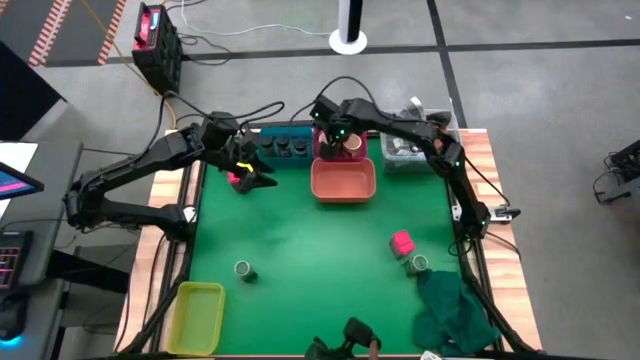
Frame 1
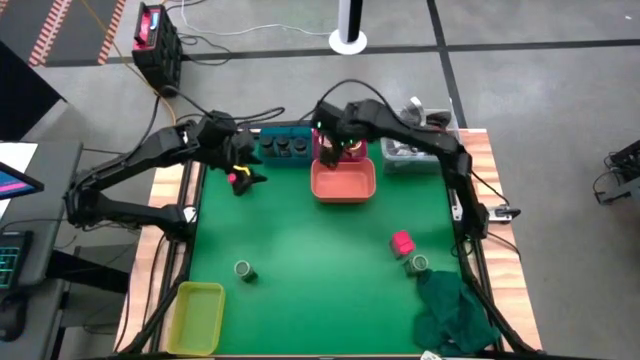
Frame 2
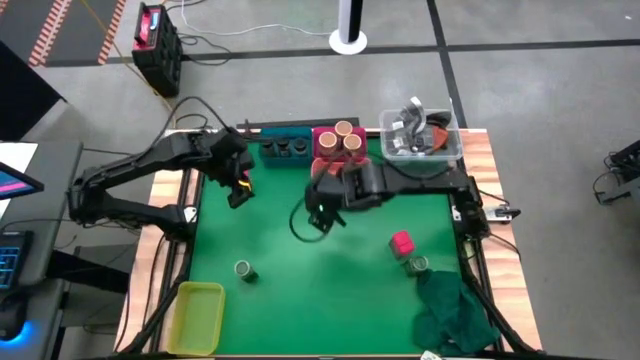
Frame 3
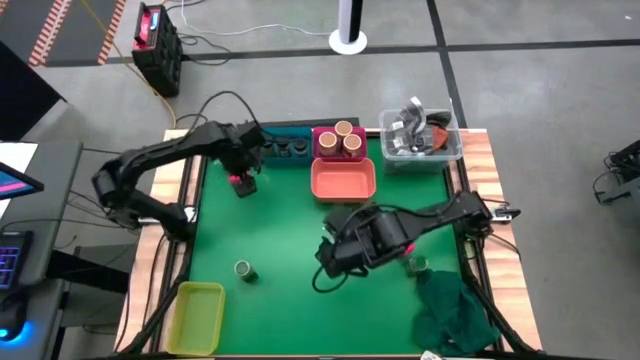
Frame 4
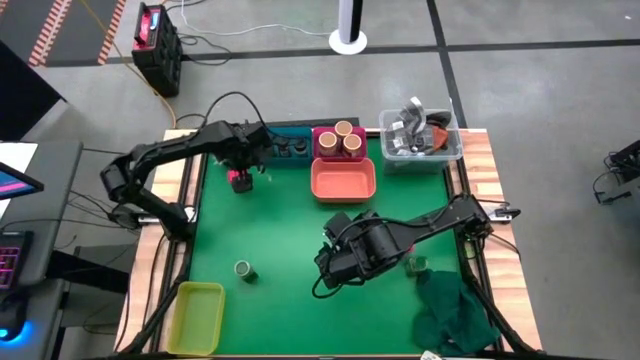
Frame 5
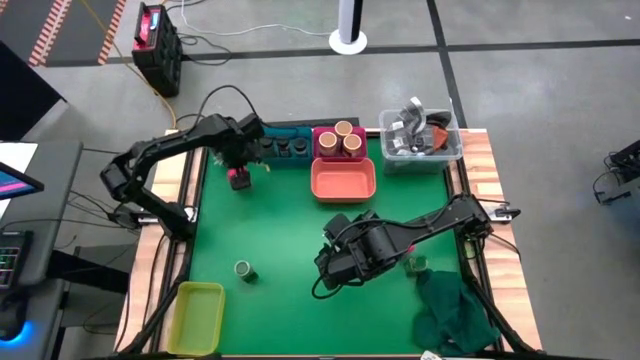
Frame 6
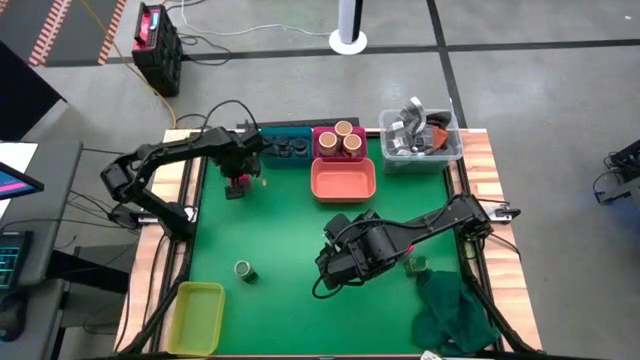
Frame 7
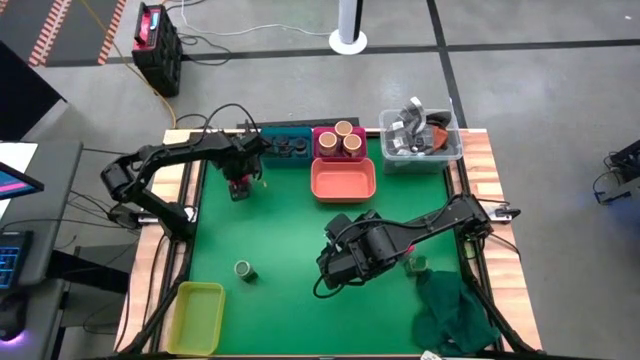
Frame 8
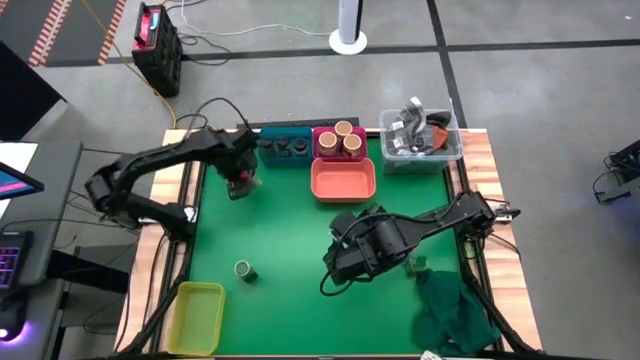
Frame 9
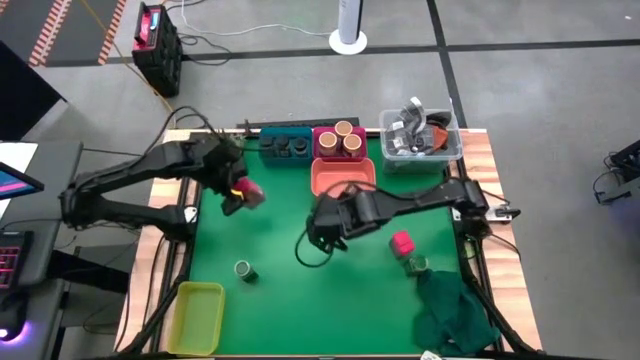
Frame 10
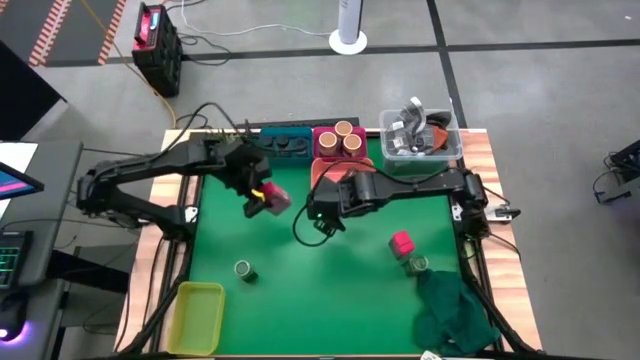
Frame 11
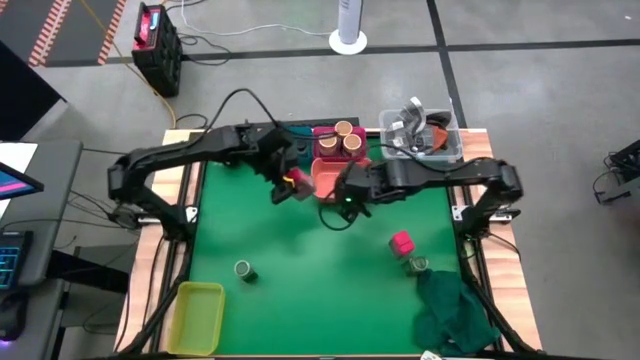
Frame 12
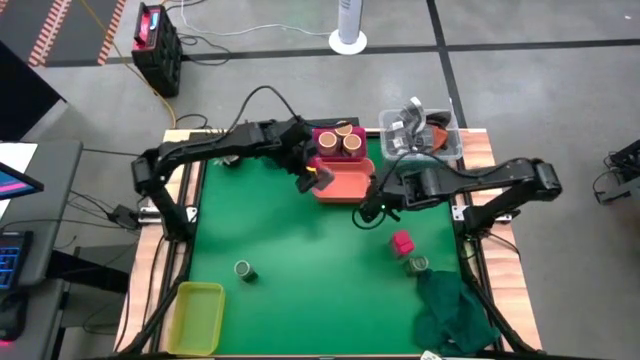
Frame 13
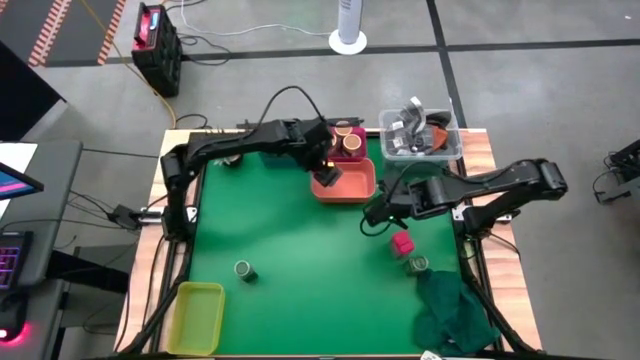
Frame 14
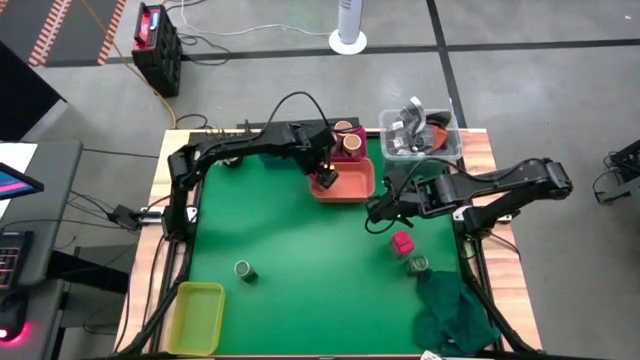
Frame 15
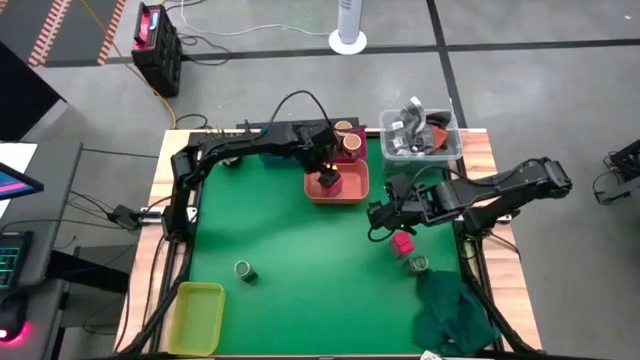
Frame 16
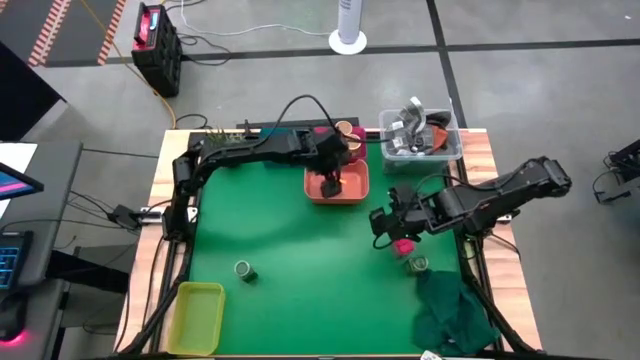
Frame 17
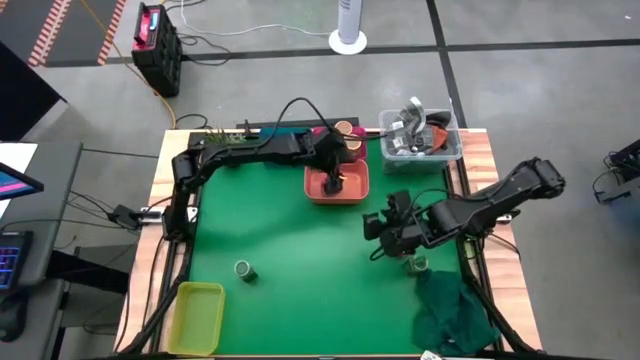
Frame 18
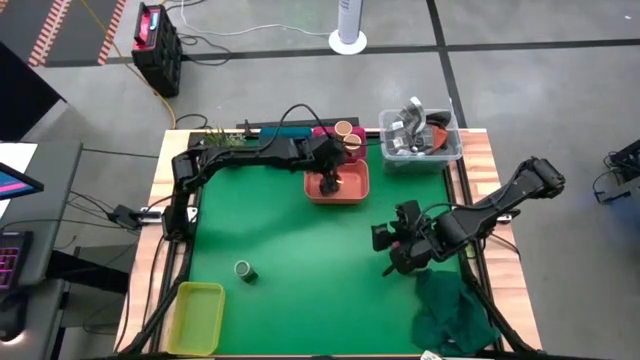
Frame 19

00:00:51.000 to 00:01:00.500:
Task: Sort spices by type
Put the left red seasoning can into the orange bin

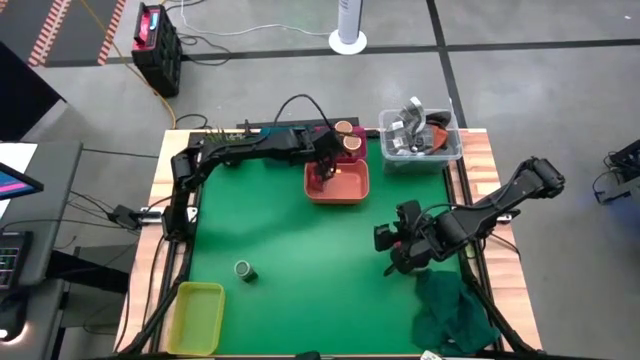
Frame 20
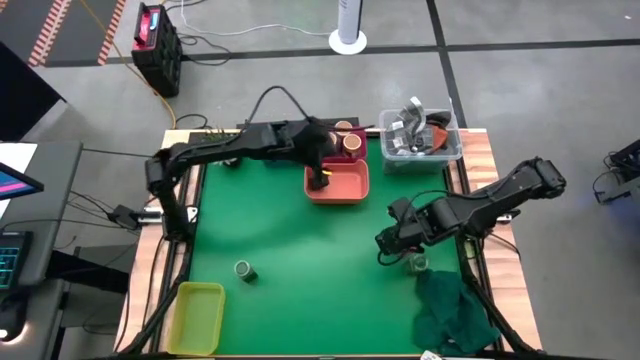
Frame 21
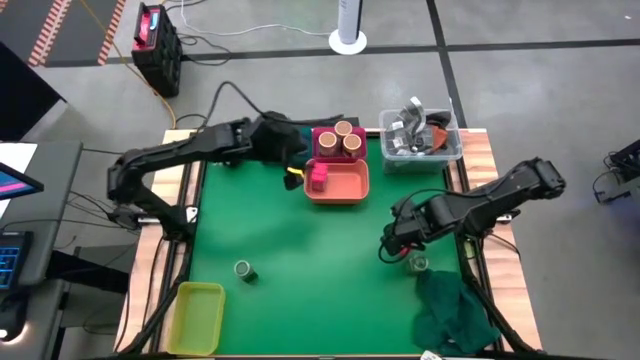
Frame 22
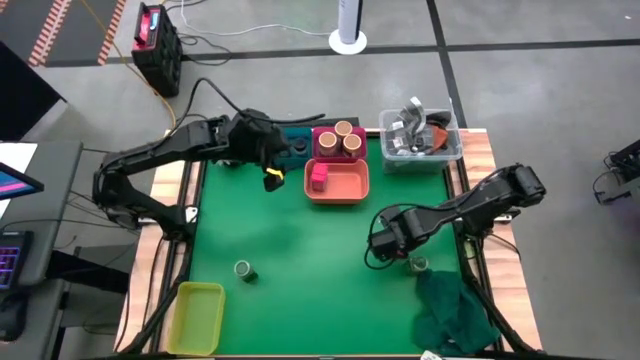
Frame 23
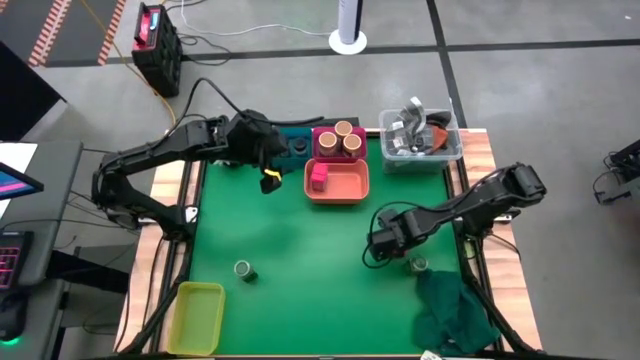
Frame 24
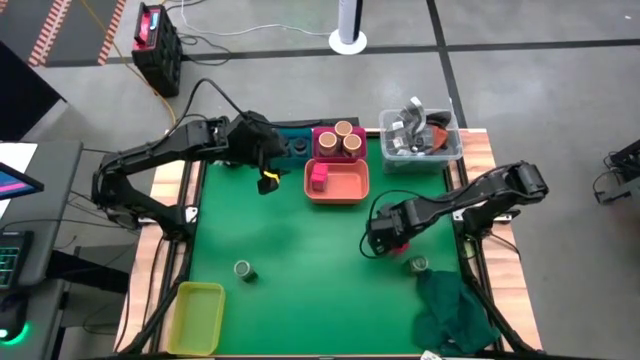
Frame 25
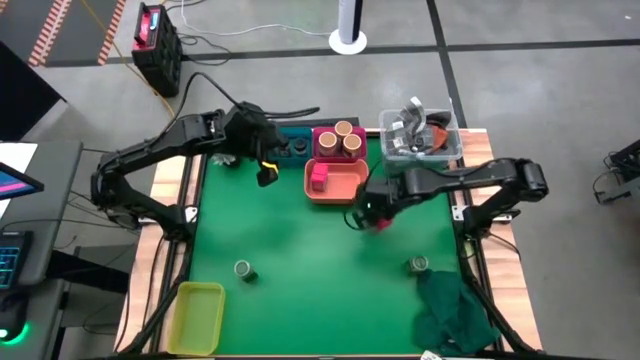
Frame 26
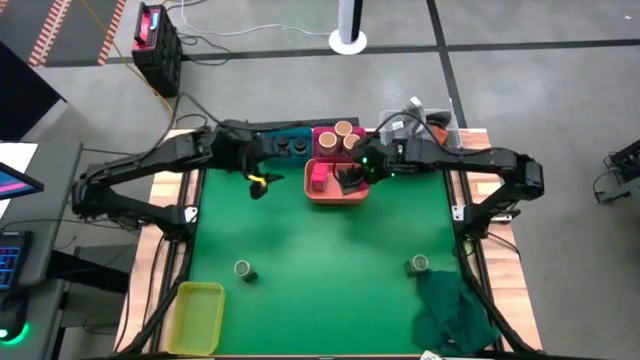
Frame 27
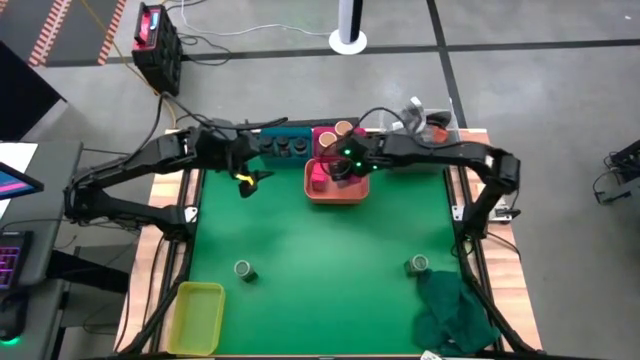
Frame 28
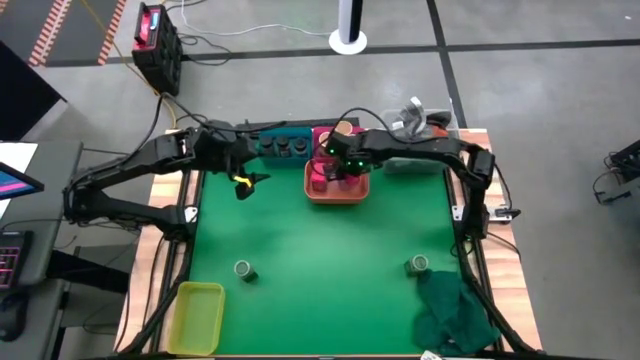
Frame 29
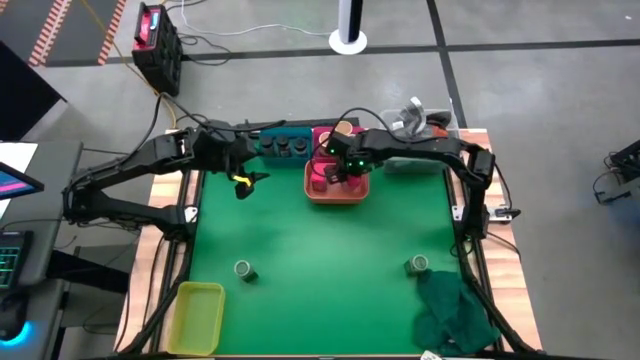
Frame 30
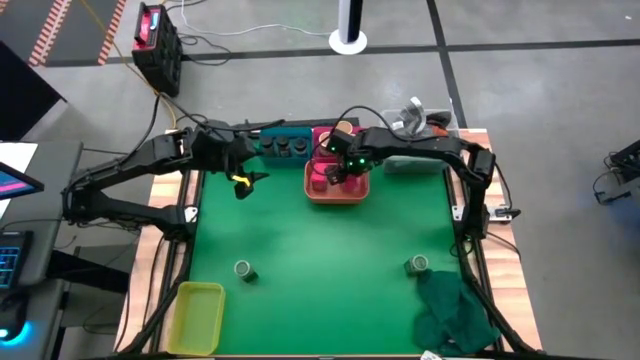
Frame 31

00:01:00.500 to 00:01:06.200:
Put the red seasoning can into the orange bin

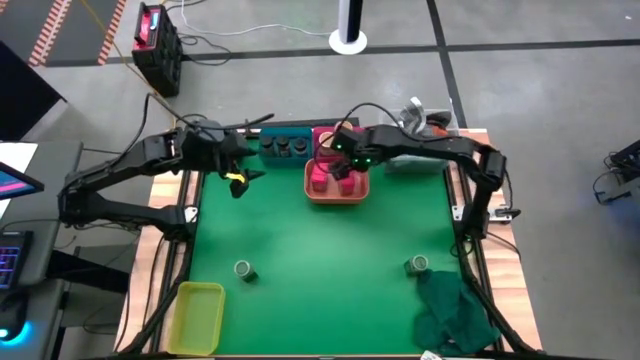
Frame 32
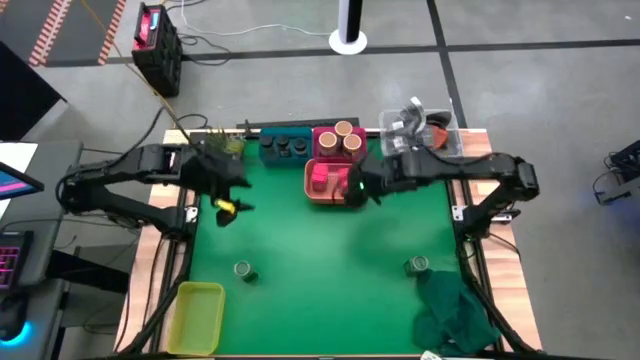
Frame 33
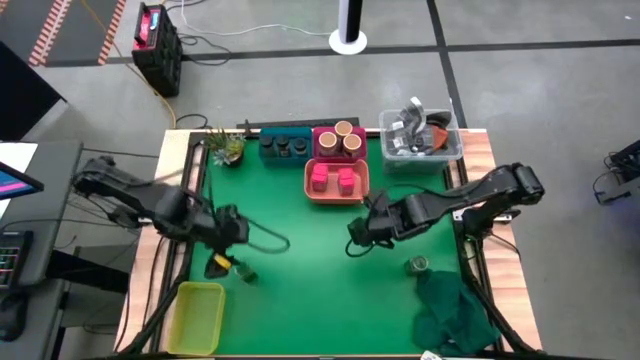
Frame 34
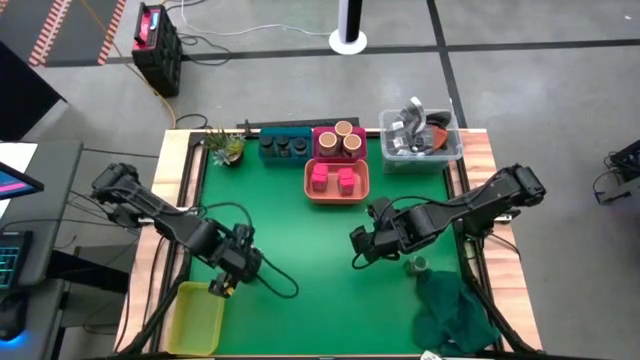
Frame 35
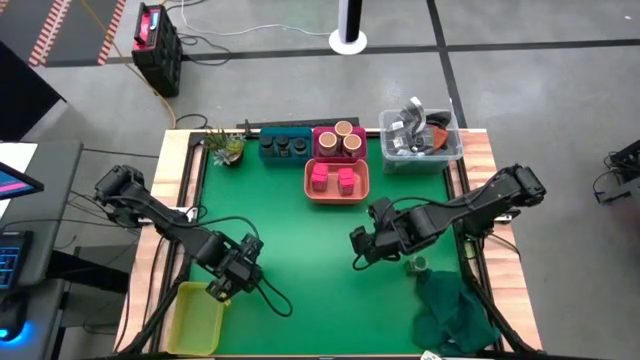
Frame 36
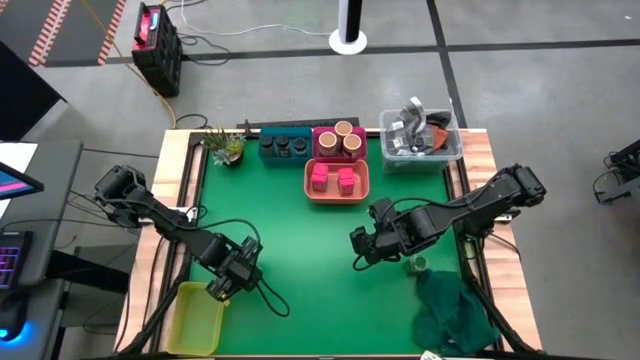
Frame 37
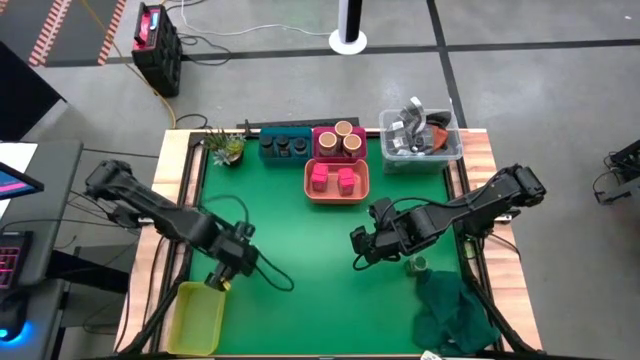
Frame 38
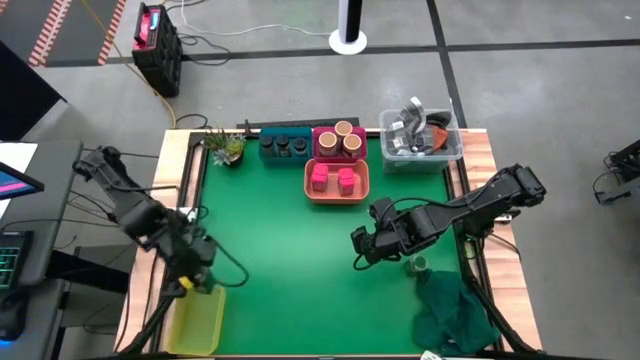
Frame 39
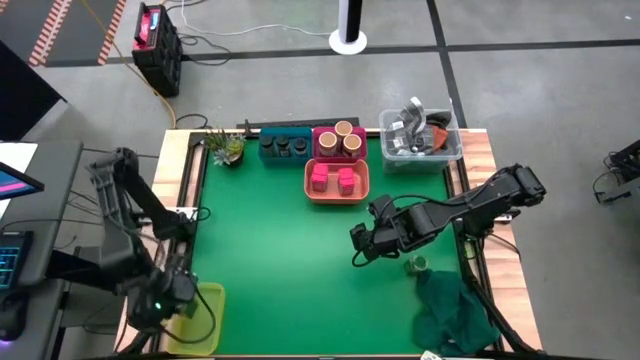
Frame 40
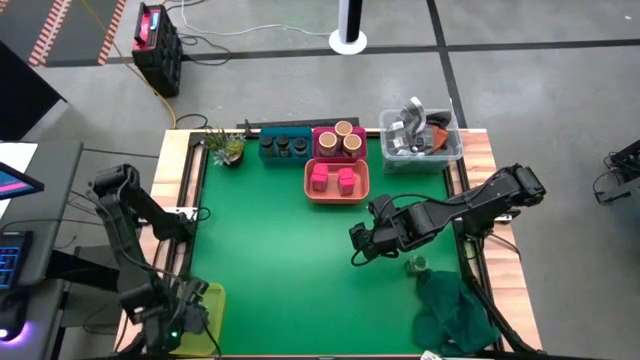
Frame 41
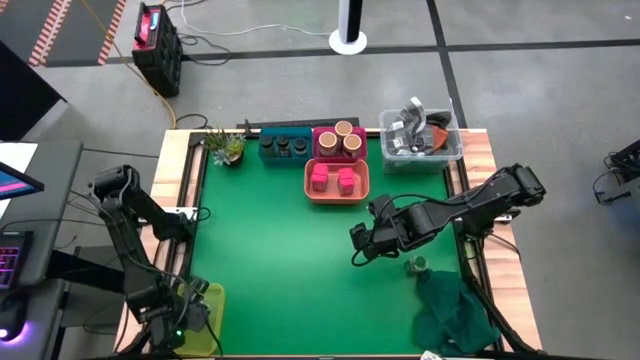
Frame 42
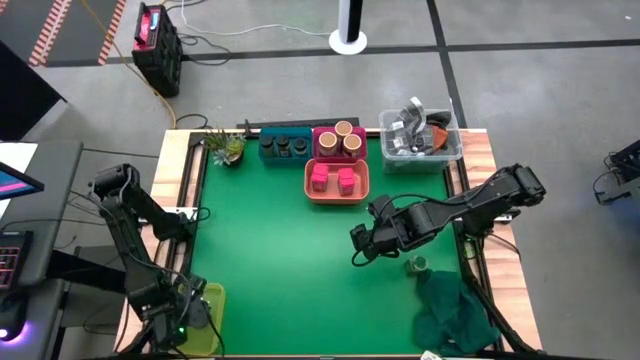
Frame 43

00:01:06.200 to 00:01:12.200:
Put the left green seasoning bottle into the yellow bin
